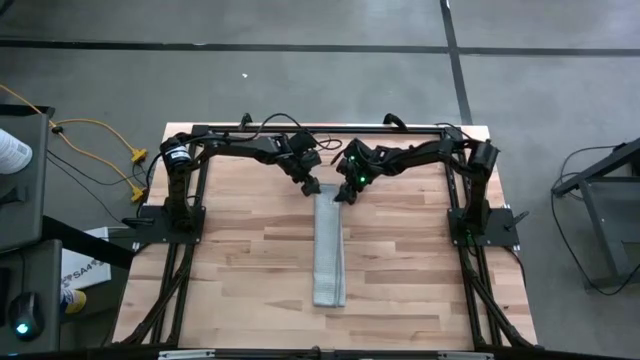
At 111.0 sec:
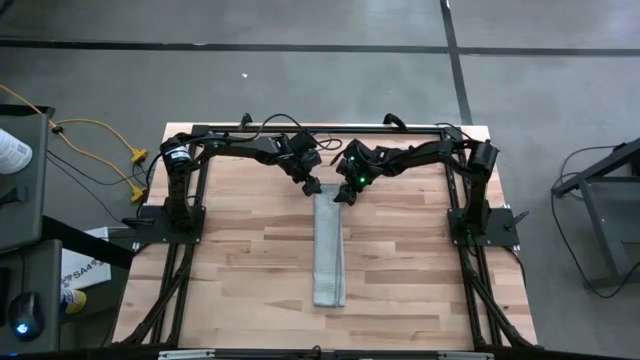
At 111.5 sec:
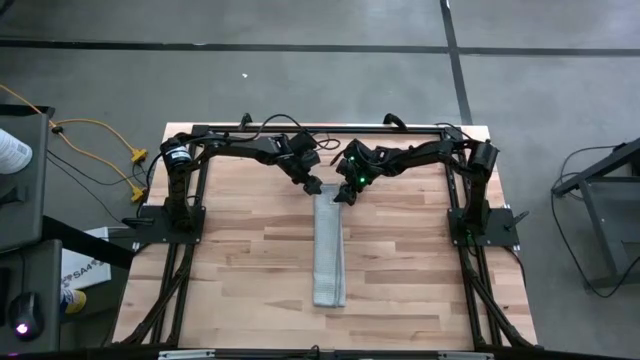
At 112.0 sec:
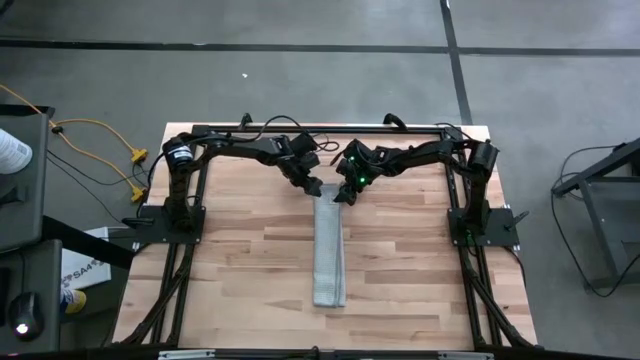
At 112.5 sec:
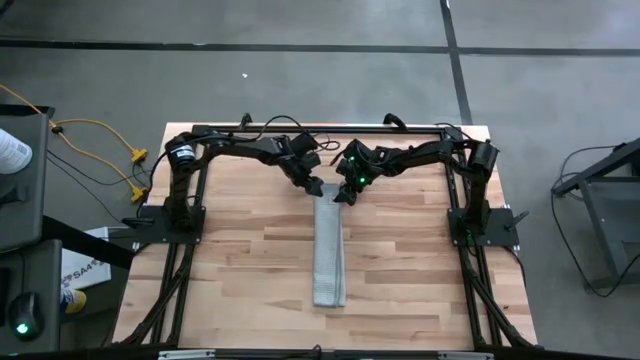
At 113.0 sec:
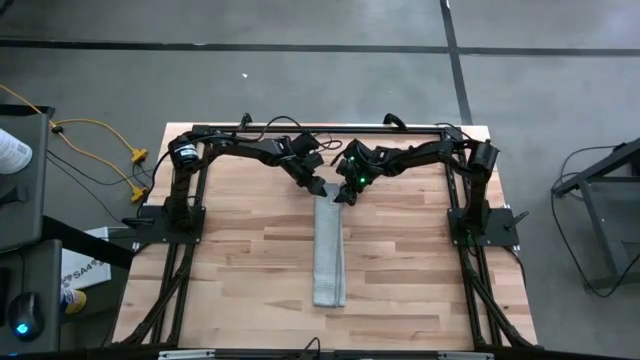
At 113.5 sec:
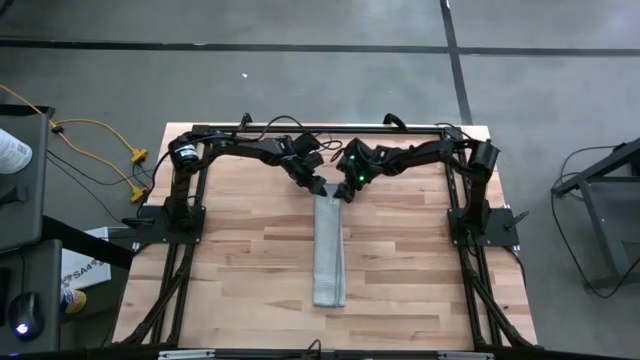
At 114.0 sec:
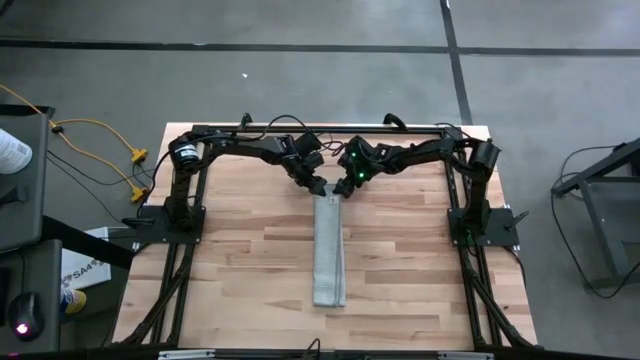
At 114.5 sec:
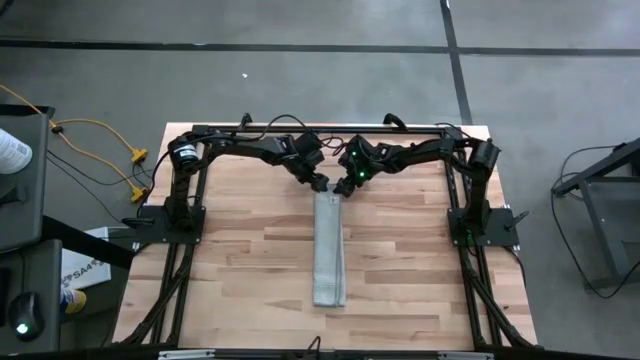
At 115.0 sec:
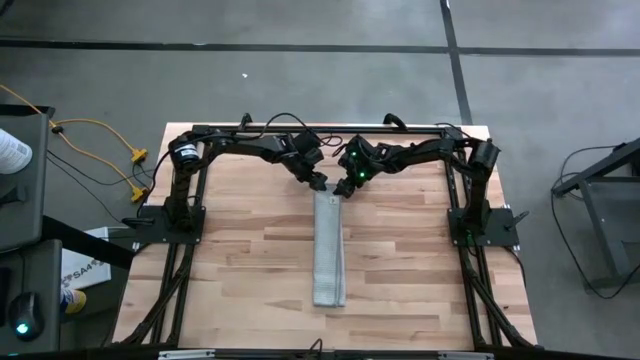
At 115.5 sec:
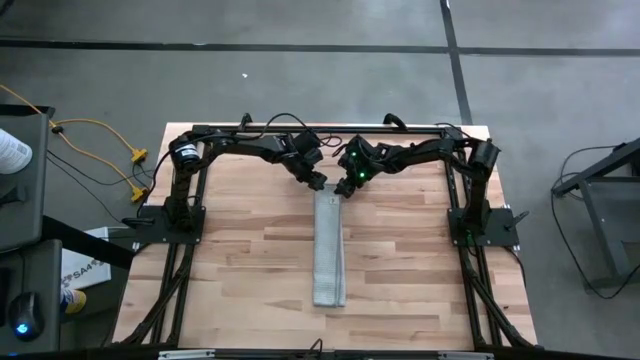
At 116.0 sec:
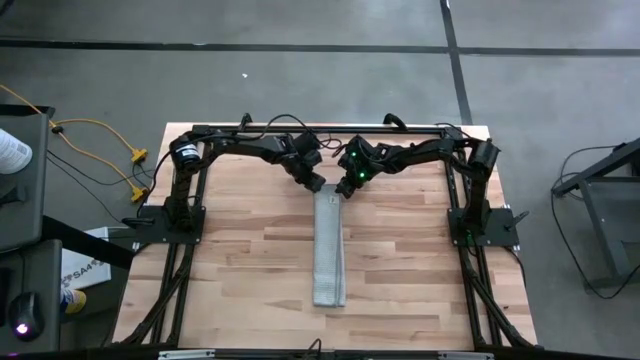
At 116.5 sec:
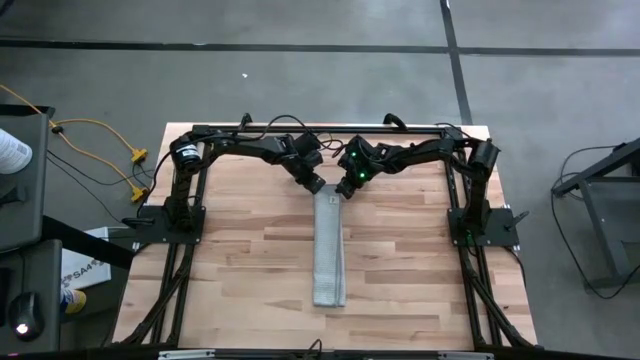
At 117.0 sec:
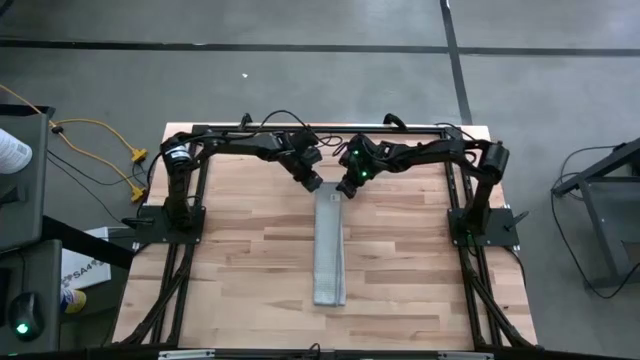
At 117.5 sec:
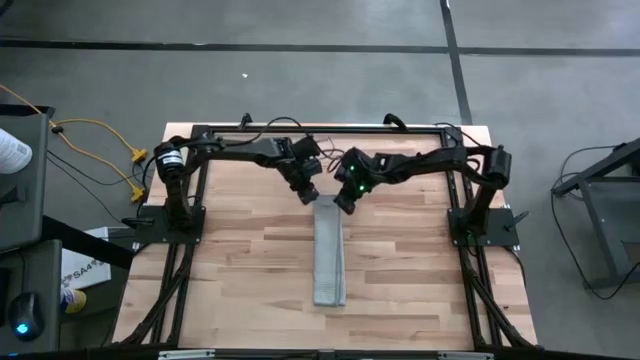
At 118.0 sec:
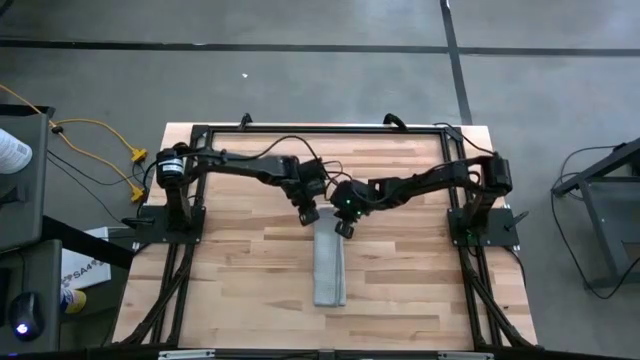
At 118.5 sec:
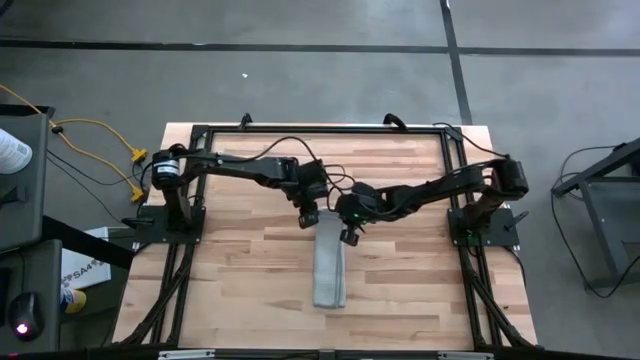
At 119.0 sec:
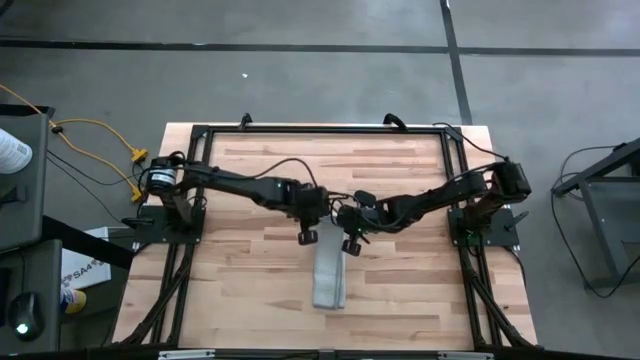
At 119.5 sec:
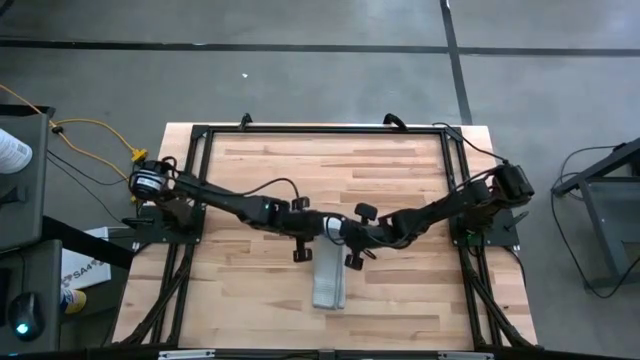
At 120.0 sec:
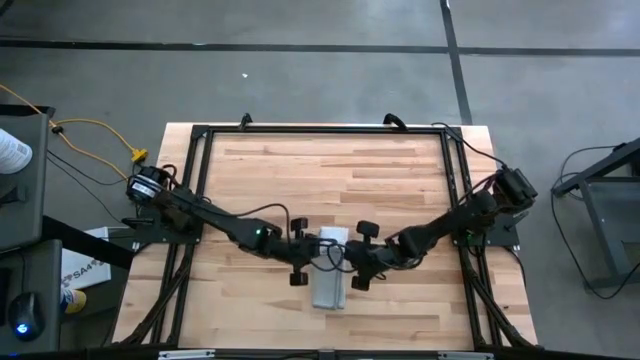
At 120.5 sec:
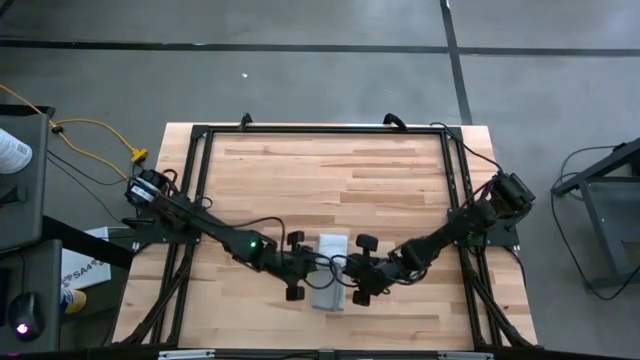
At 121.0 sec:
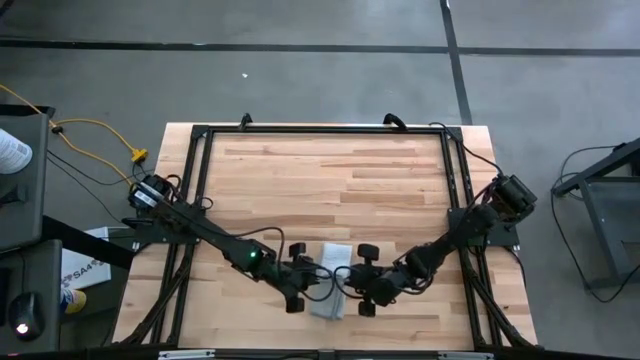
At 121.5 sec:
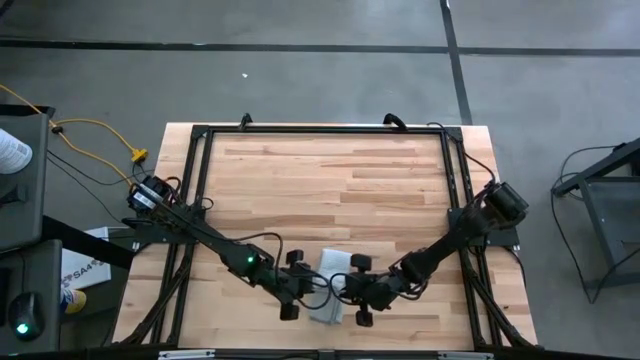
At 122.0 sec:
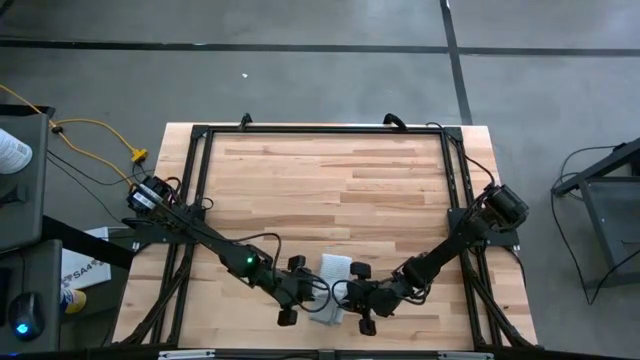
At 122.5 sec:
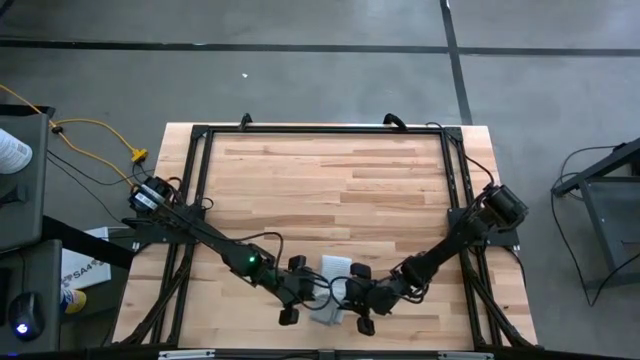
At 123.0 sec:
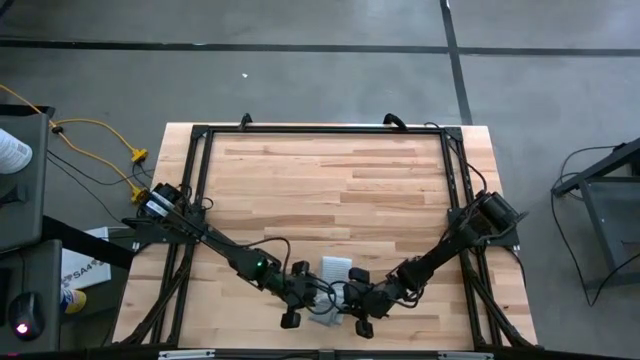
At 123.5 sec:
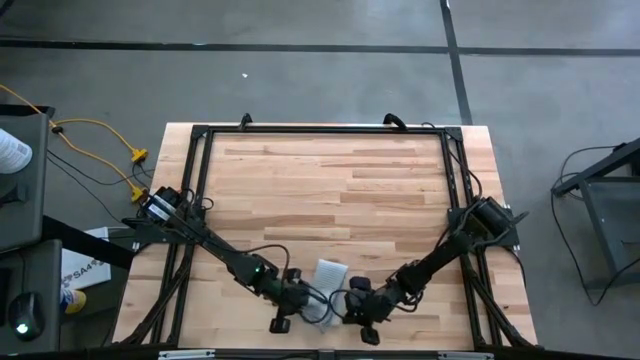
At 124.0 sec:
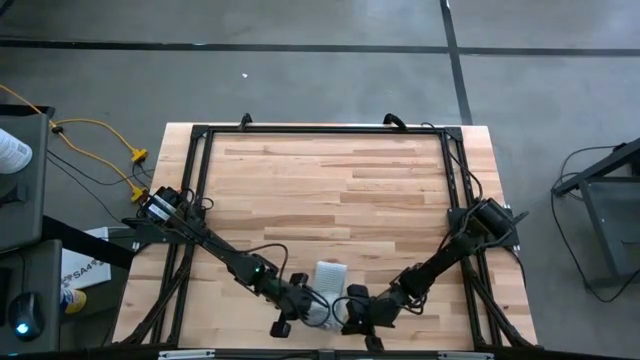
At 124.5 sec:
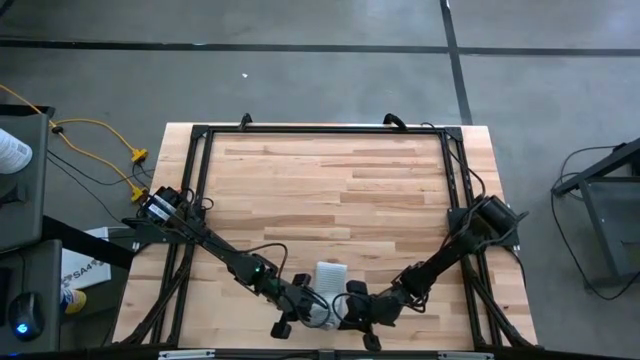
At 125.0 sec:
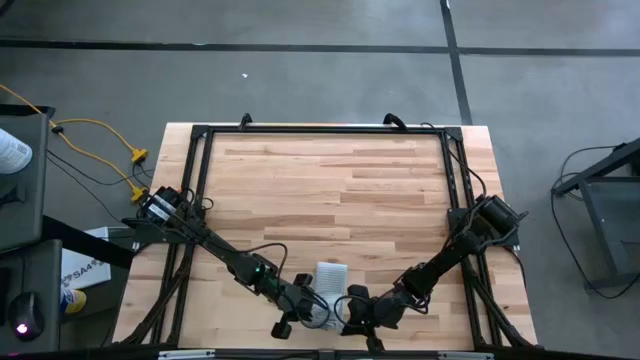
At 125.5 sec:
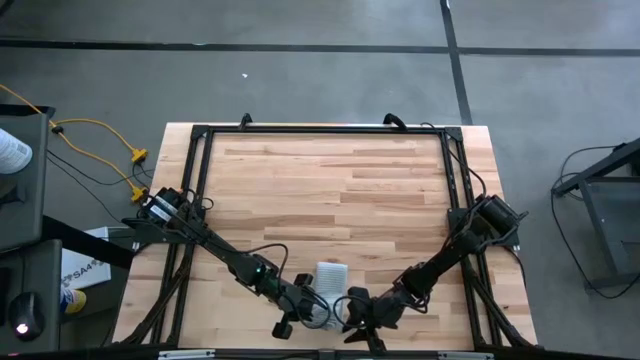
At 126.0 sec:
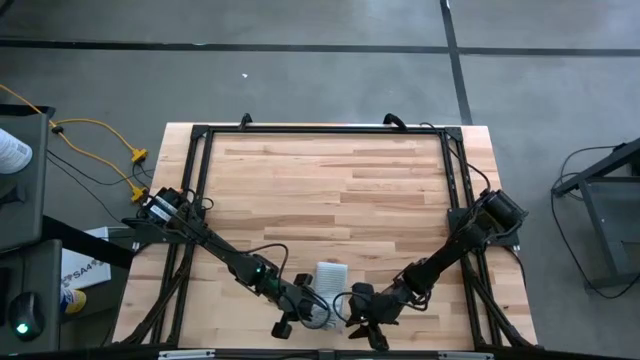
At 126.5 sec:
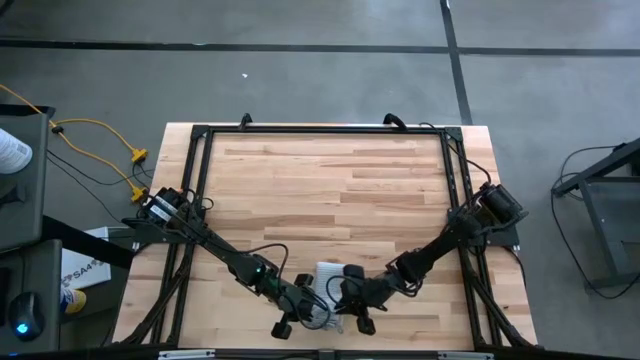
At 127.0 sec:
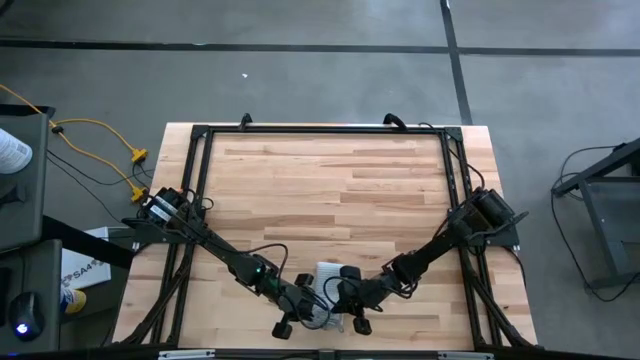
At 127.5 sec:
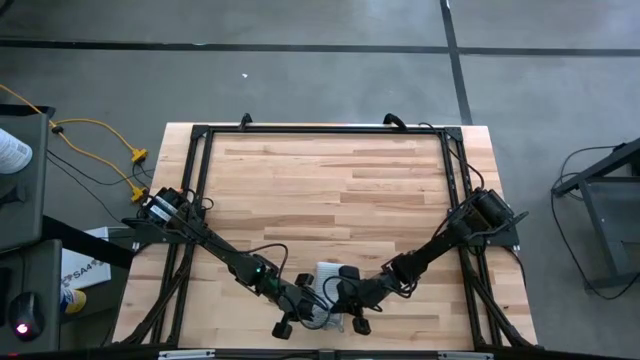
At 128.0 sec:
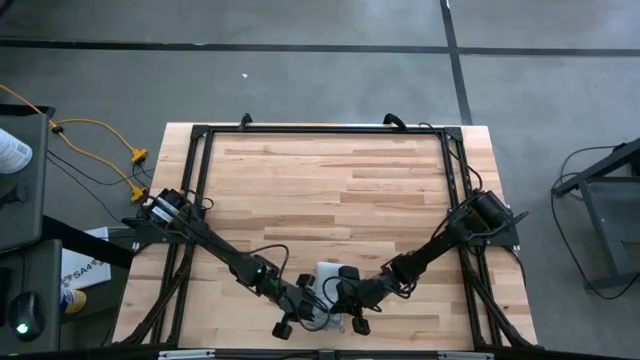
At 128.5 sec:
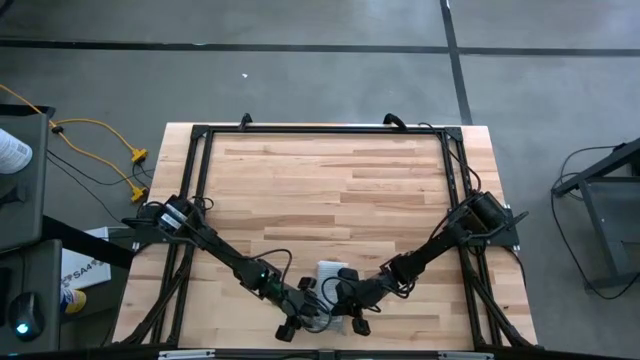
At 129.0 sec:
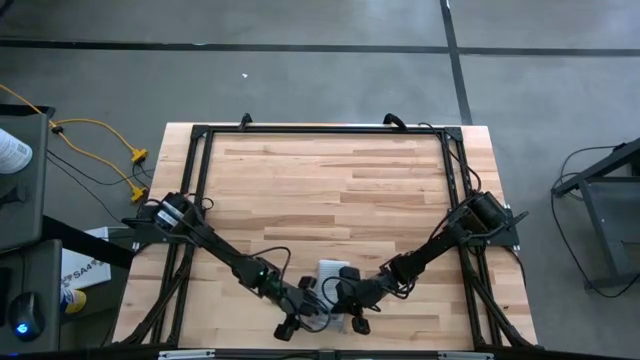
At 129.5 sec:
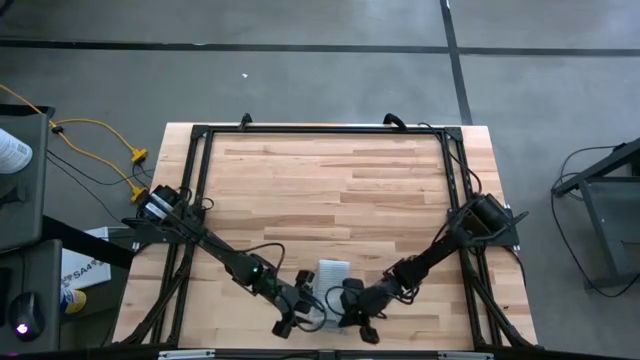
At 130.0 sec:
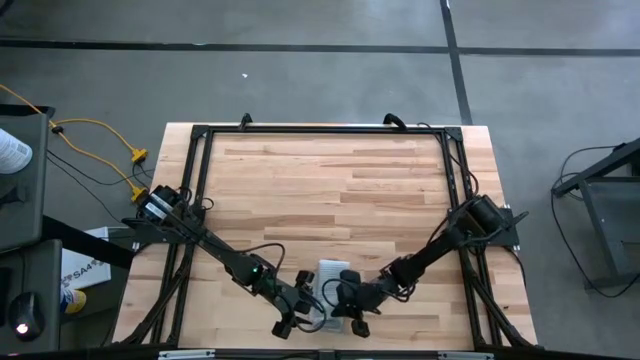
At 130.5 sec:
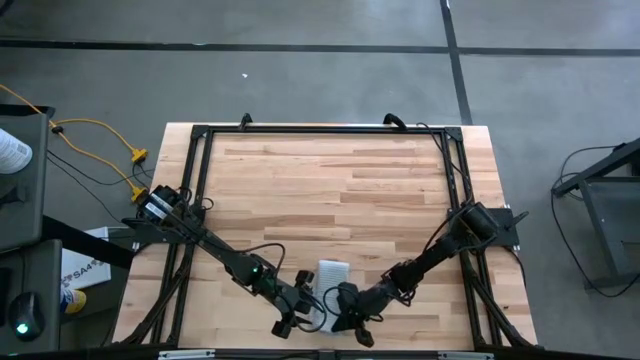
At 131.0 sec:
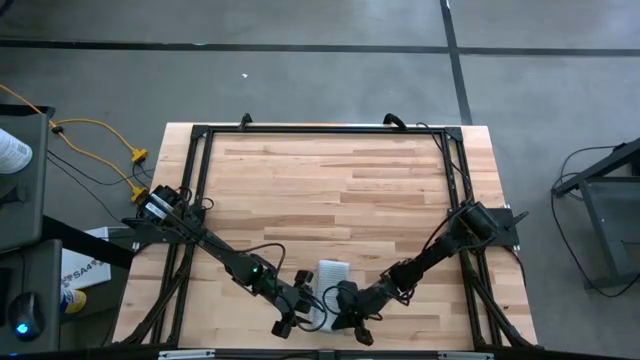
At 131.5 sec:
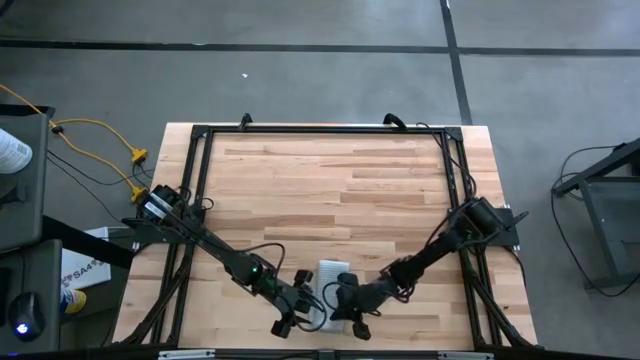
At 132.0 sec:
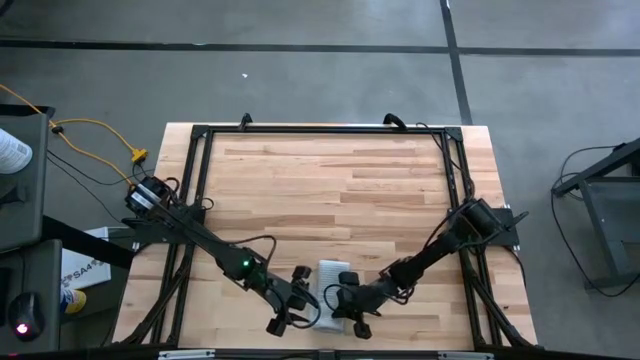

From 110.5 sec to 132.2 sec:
Task: Fold microfiber towels
Fold the gray towel
